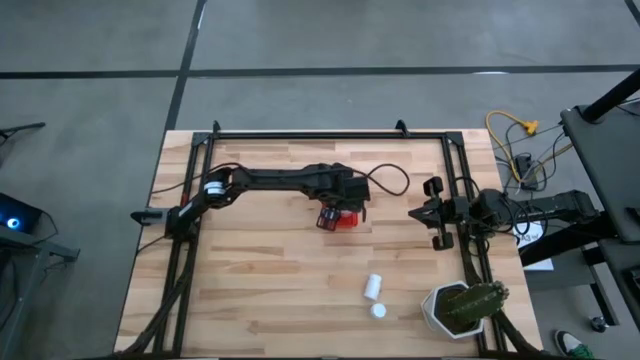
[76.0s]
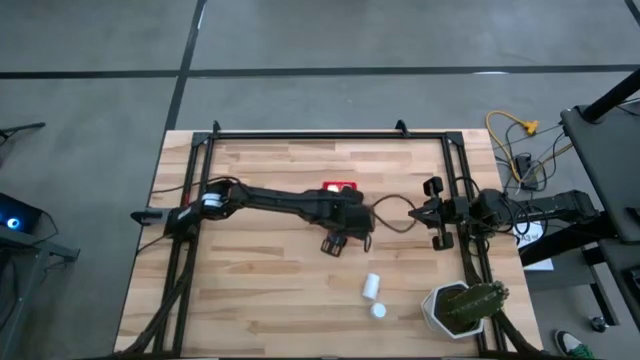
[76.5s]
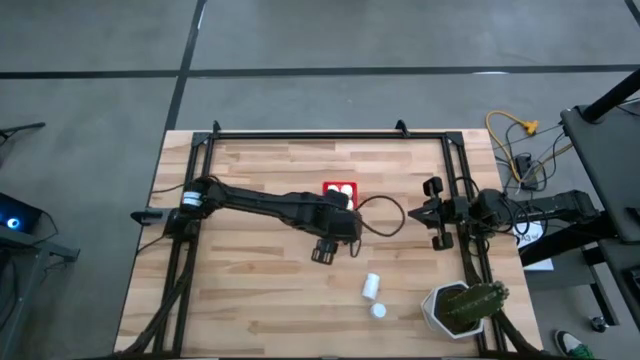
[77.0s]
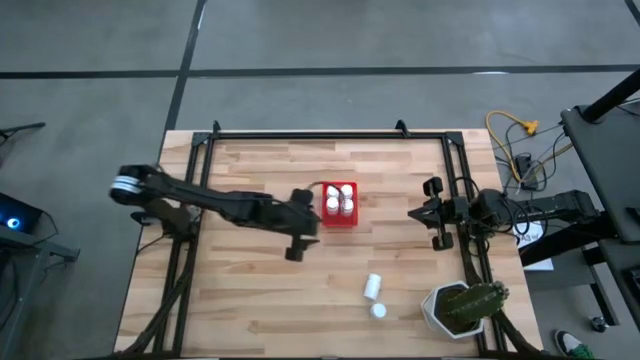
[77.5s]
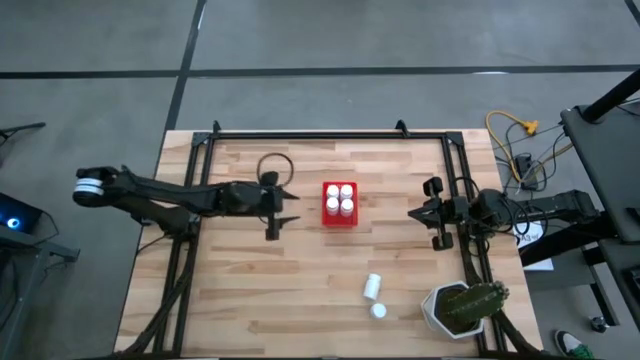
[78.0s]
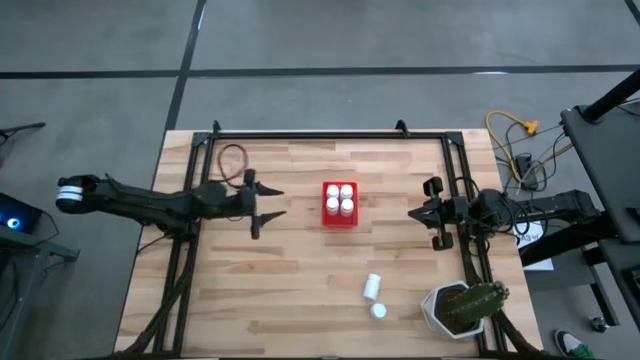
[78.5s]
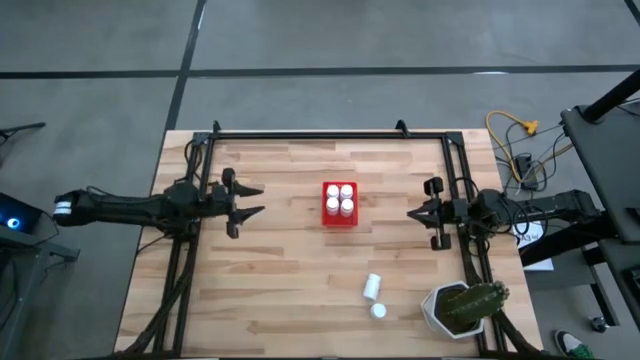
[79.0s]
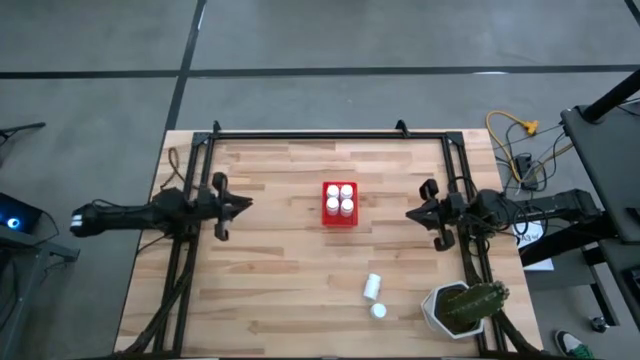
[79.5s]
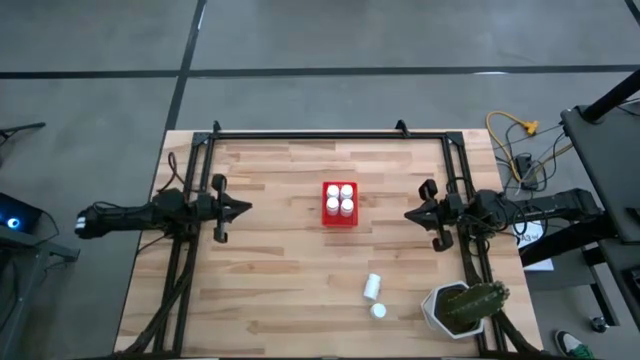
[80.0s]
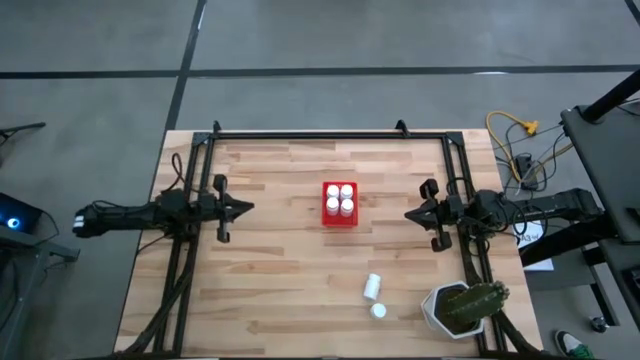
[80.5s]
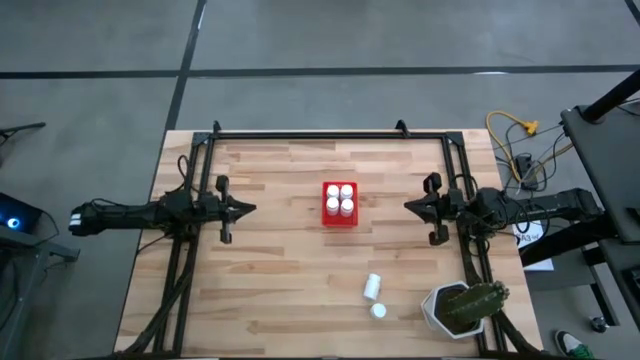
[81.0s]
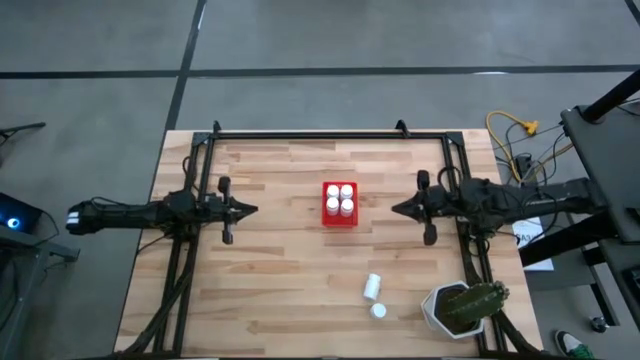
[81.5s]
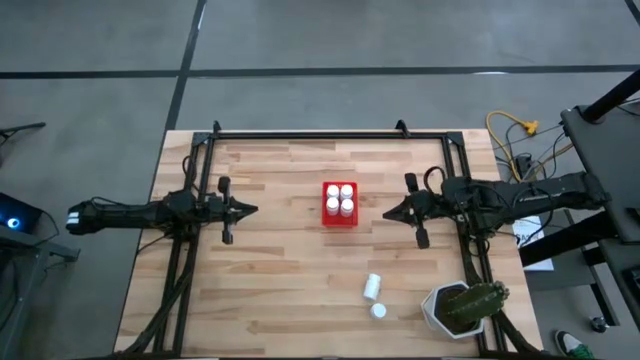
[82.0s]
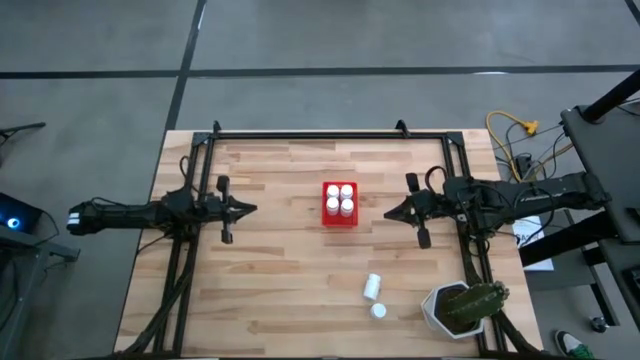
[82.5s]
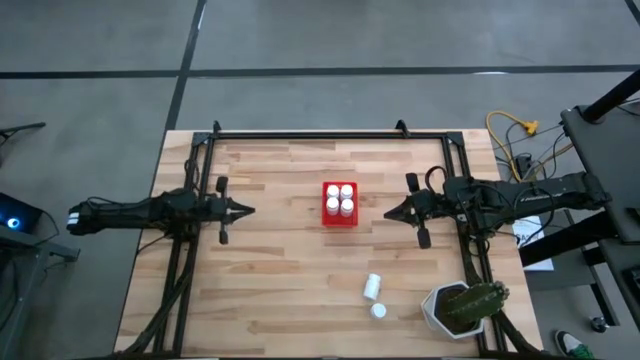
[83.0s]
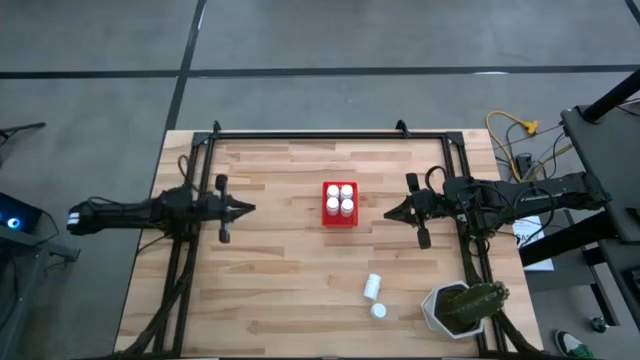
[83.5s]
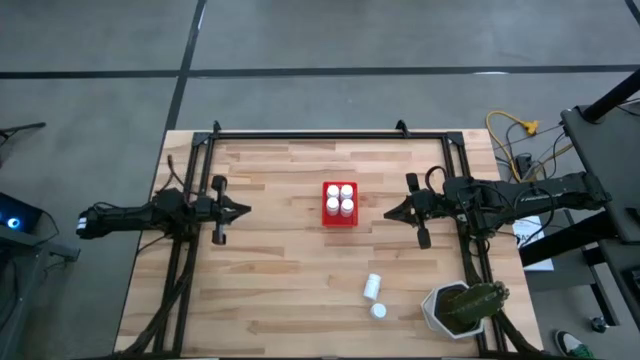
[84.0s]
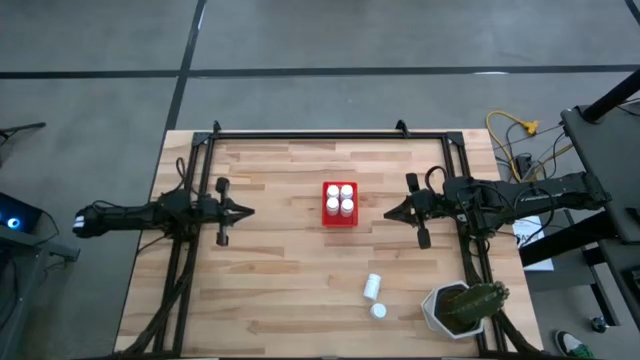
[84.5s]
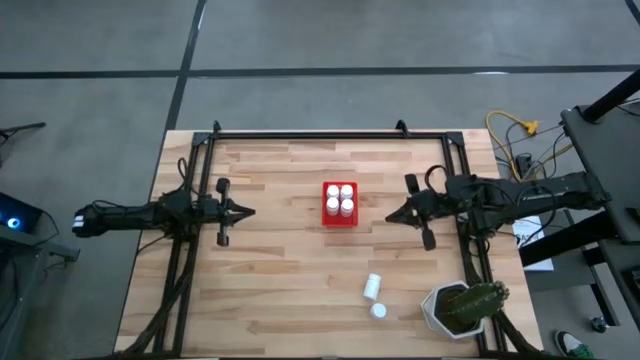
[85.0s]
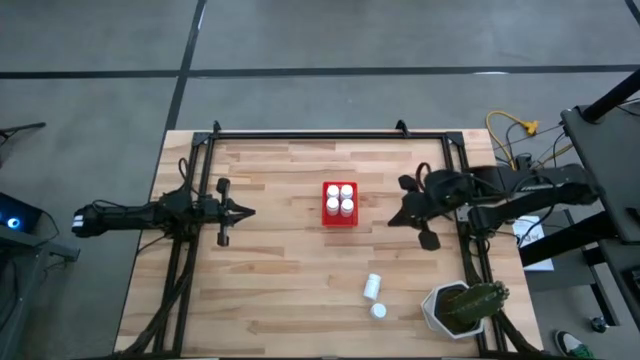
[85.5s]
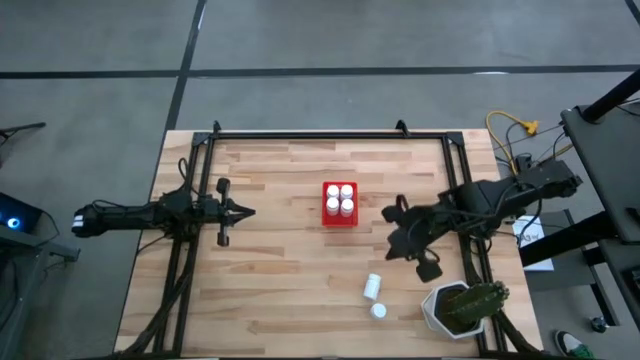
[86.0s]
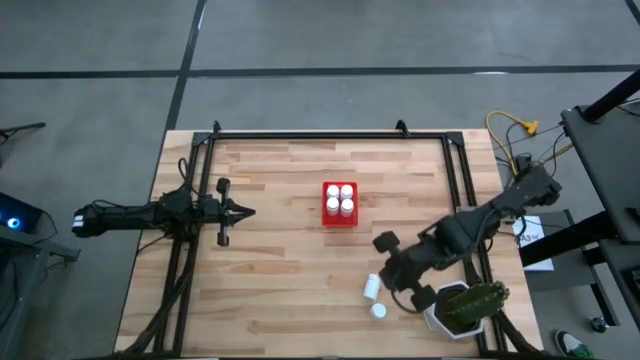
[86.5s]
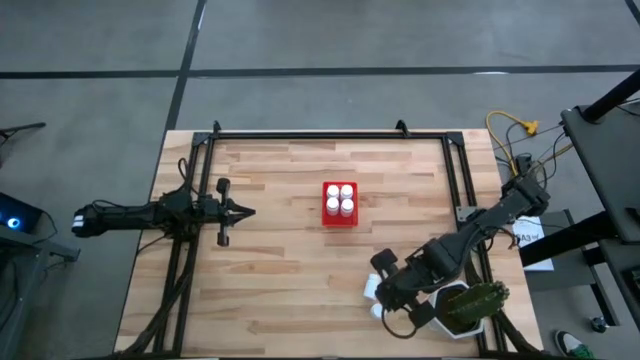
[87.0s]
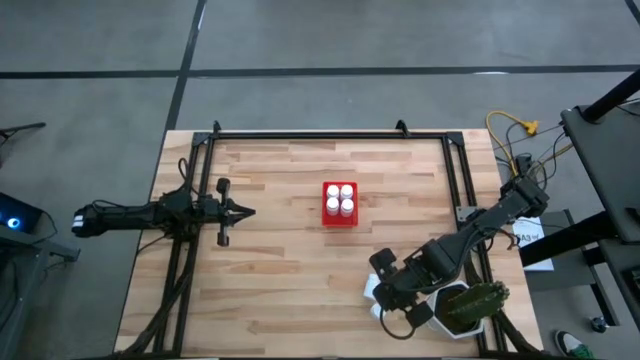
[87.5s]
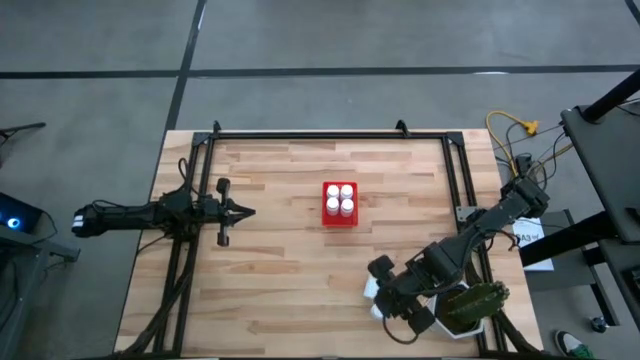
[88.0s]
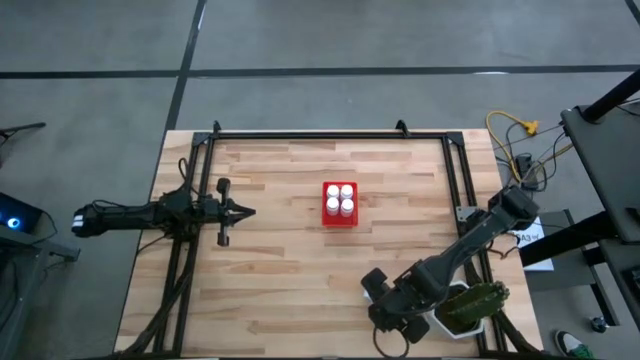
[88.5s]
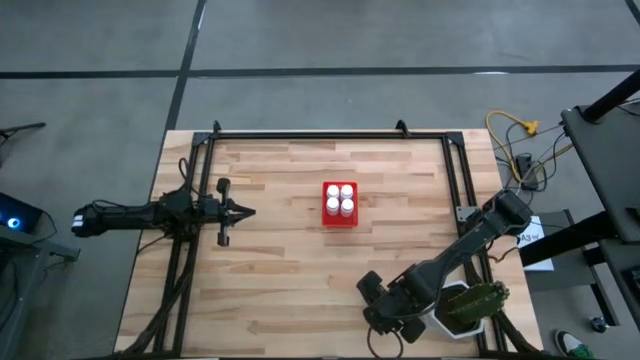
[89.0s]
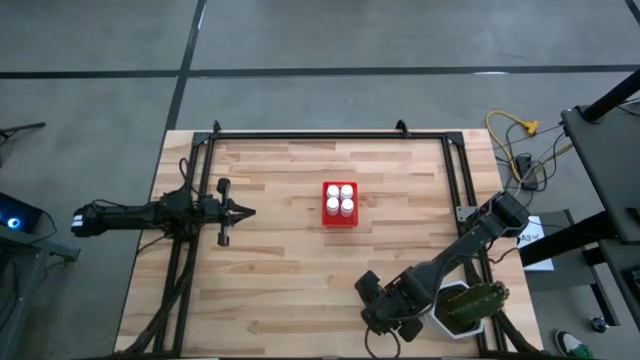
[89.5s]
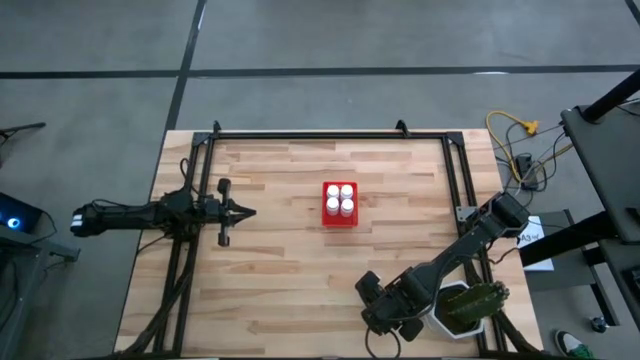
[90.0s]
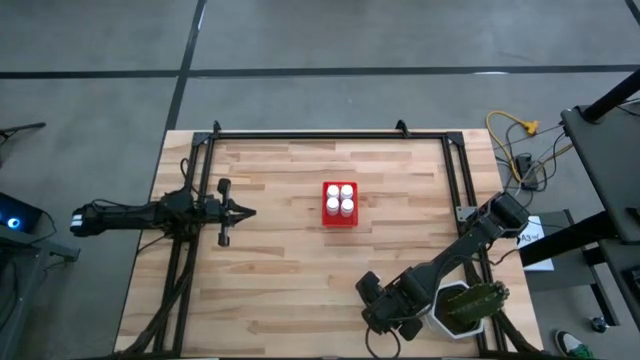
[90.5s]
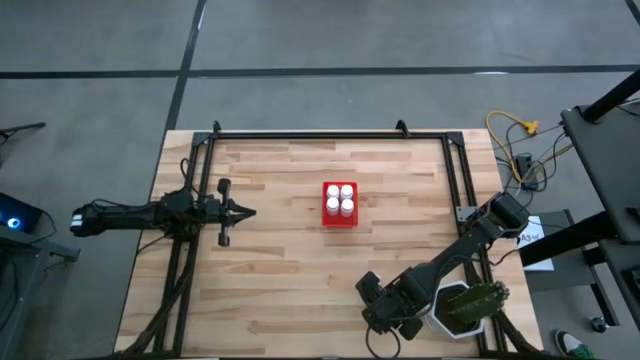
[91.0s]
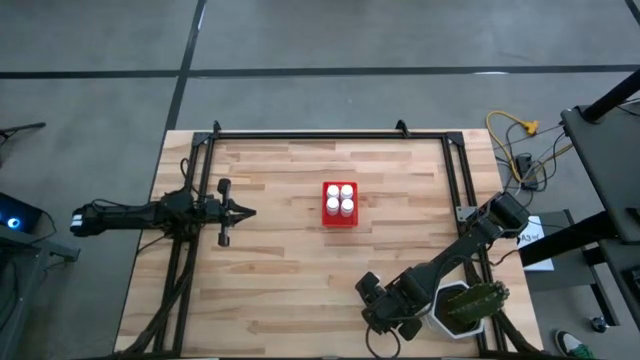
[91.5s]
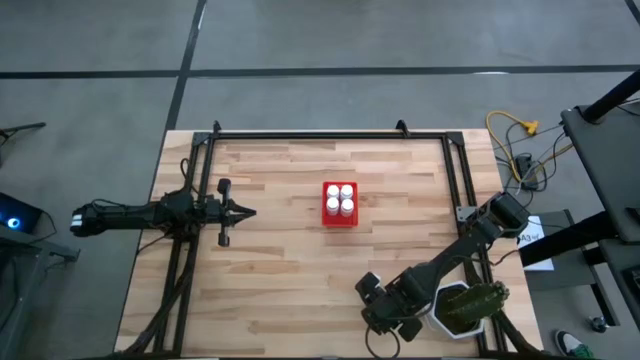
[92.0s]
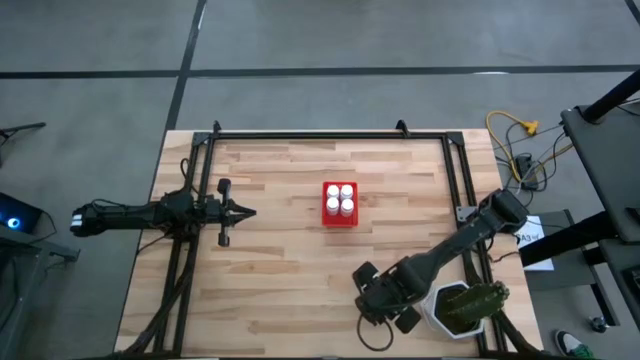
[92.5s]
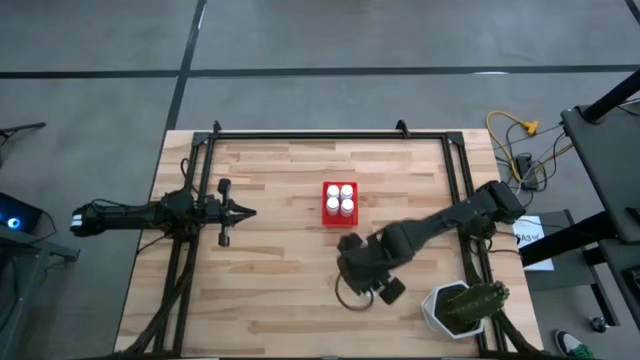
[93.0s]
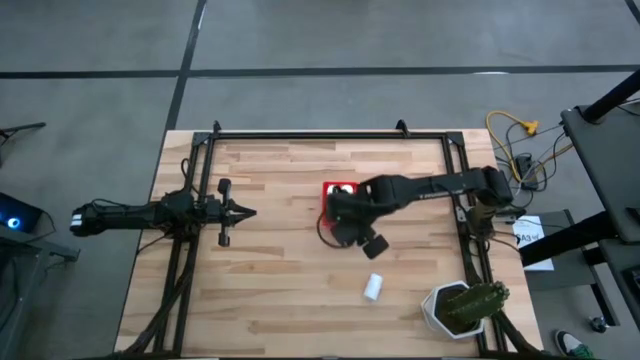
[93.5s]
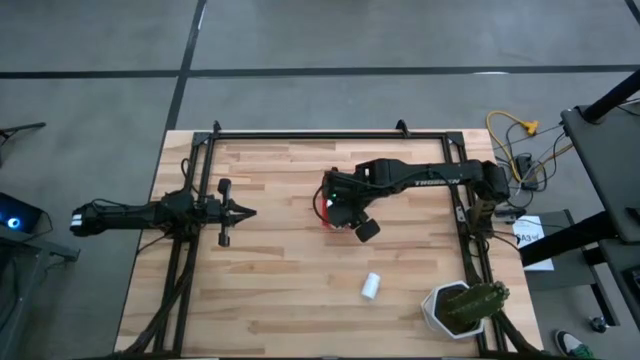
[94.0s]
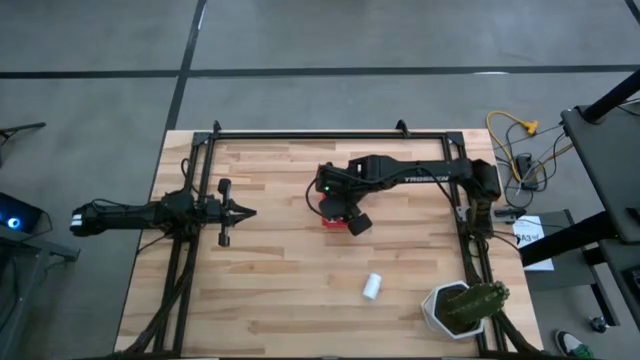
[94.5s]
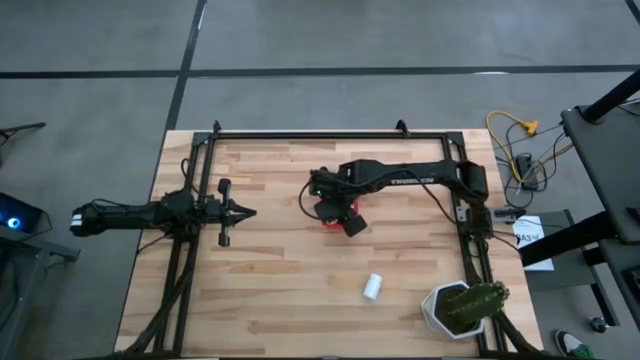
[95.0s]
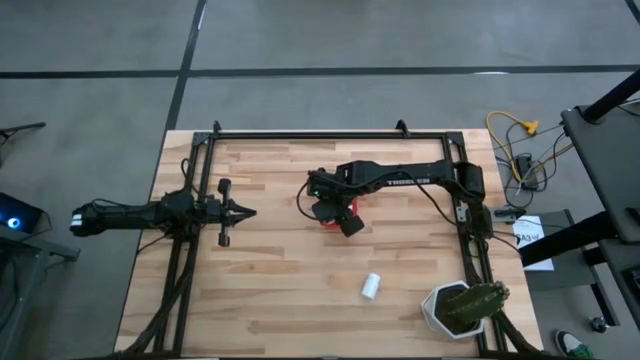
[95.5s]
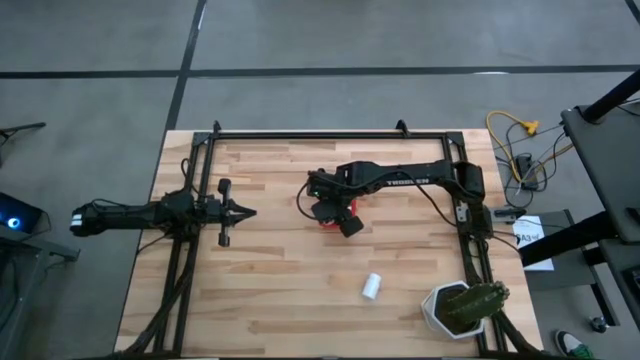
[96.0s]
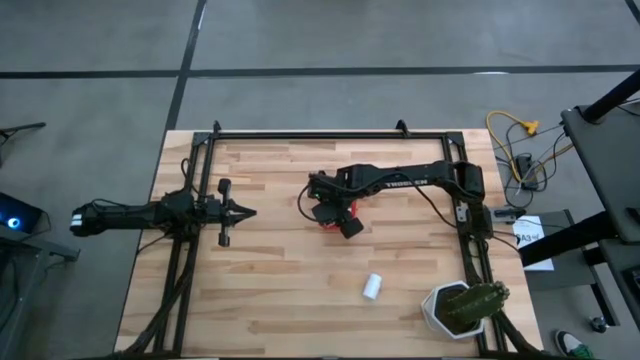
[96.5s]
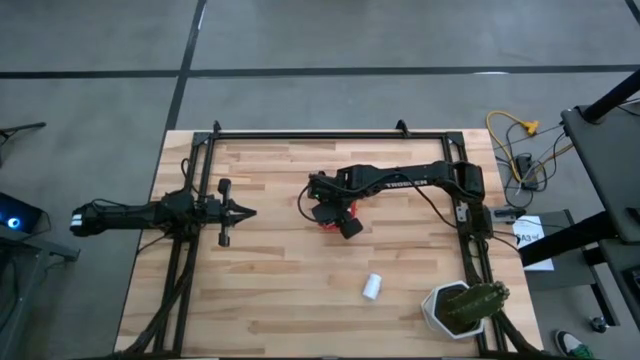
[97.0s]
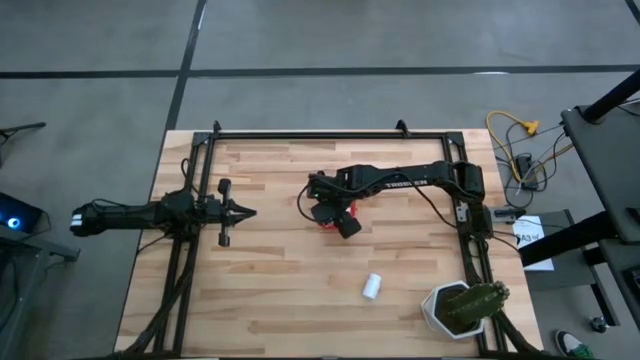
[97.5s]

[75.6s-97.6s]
Task: Pick and place pill bottles into a basket
Put the bottom white medicine bottle into the red bin
